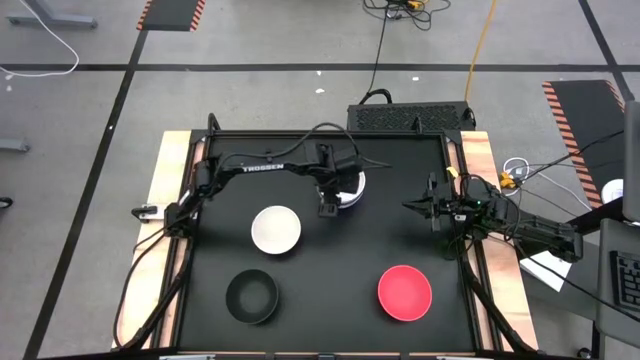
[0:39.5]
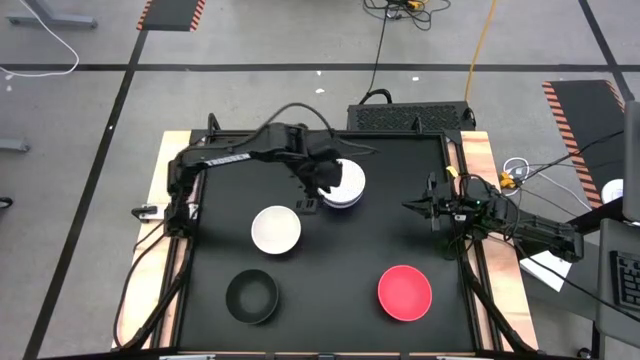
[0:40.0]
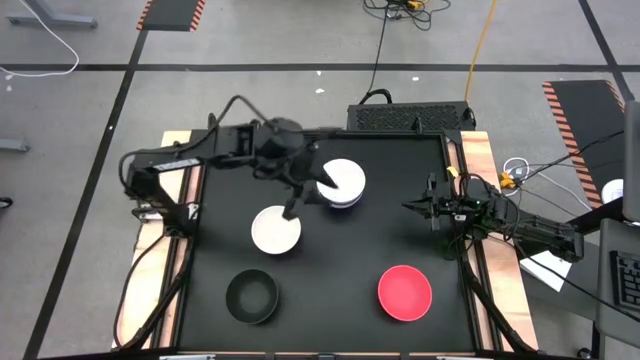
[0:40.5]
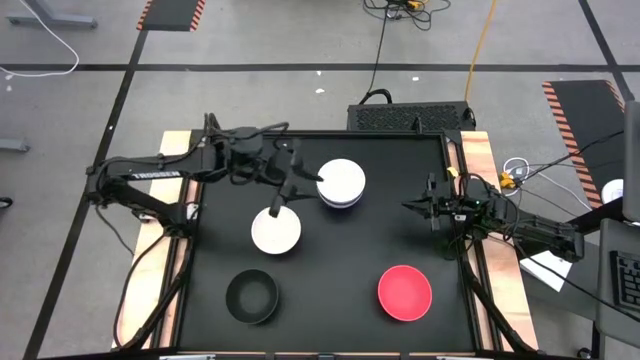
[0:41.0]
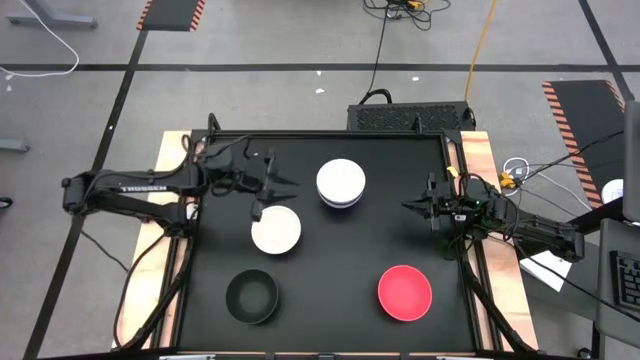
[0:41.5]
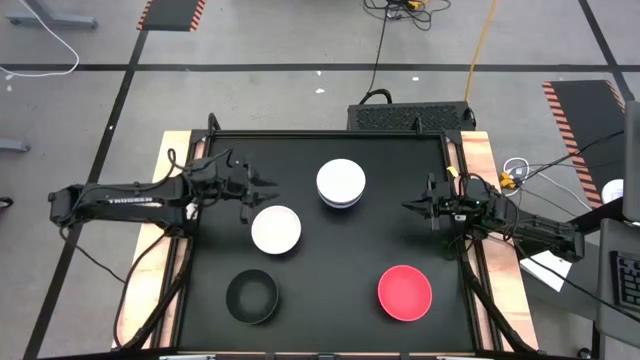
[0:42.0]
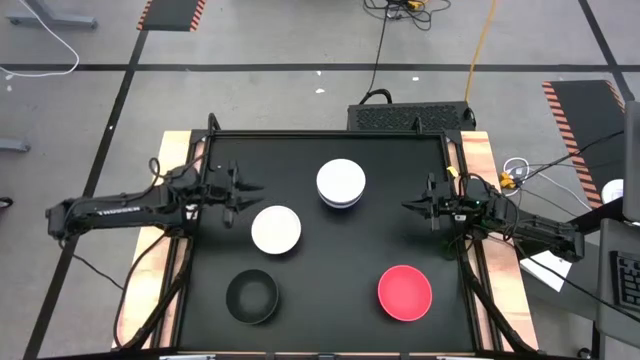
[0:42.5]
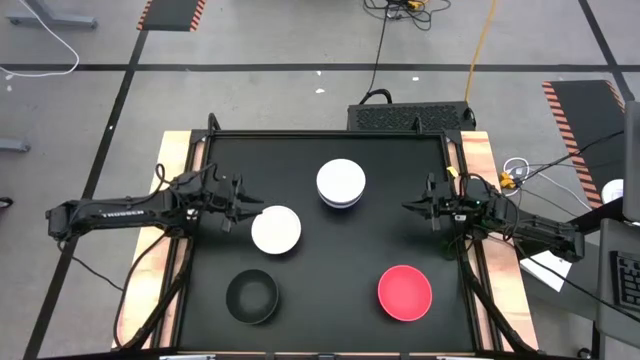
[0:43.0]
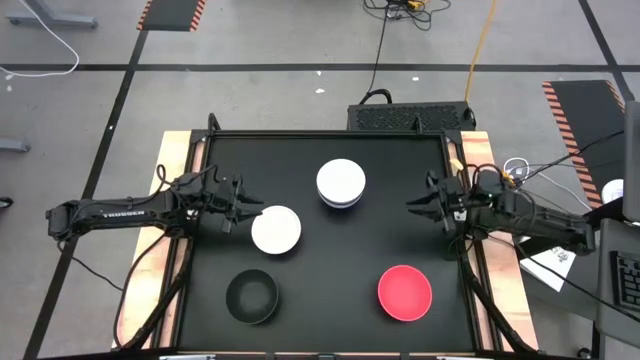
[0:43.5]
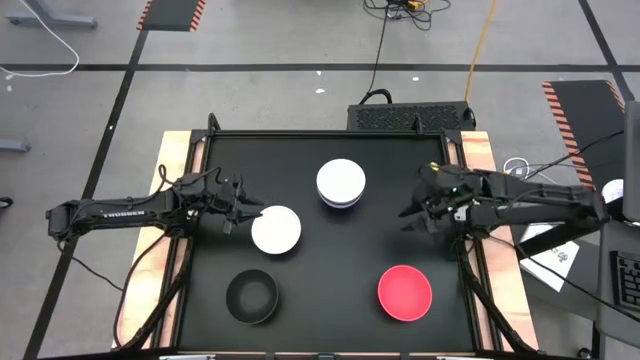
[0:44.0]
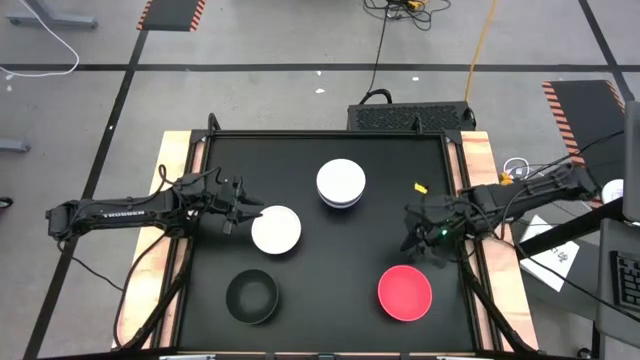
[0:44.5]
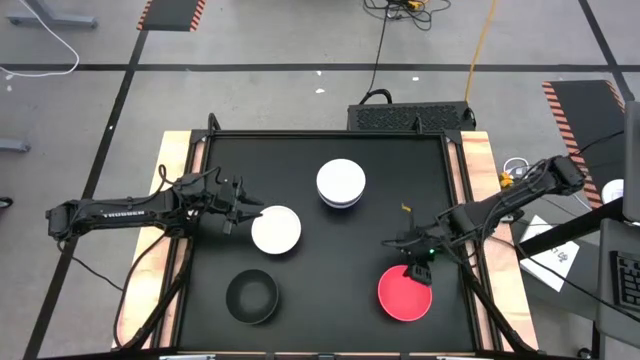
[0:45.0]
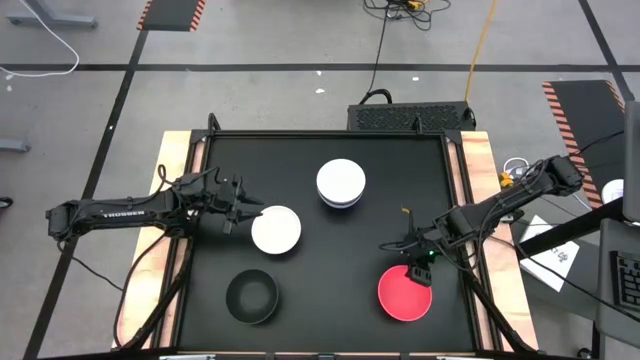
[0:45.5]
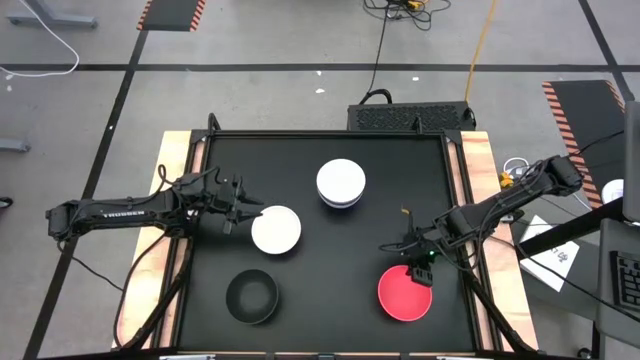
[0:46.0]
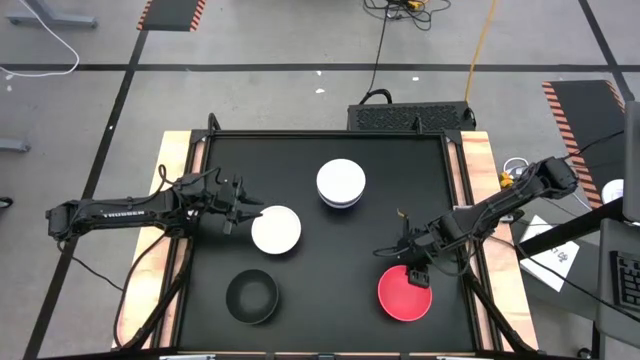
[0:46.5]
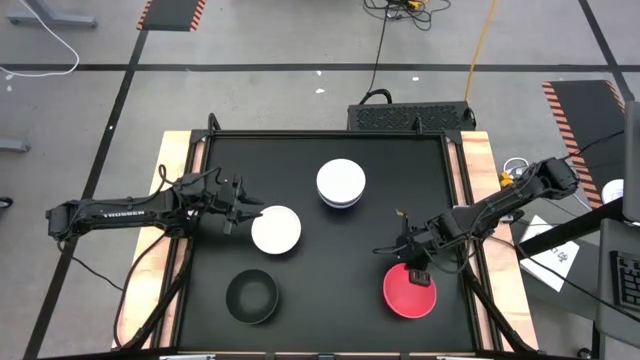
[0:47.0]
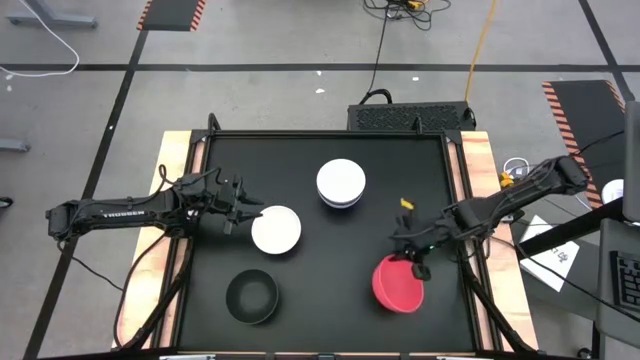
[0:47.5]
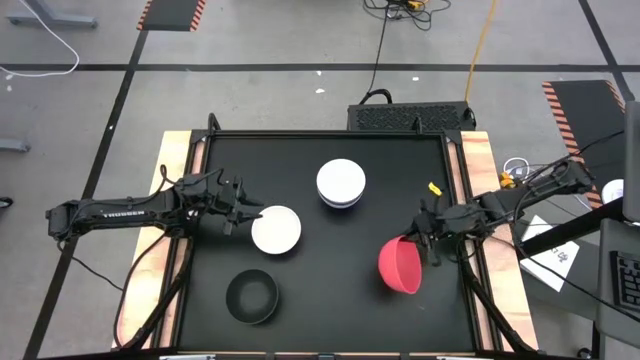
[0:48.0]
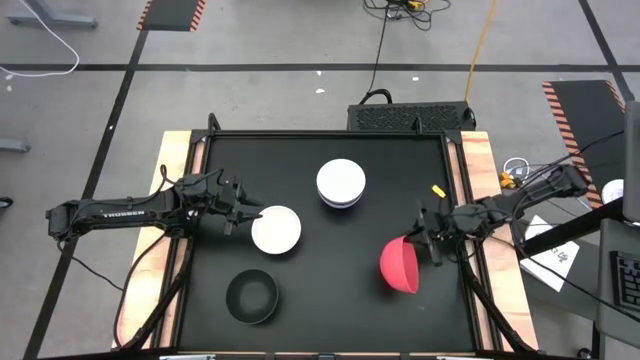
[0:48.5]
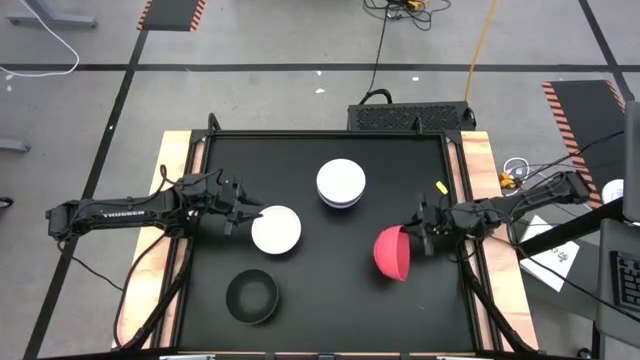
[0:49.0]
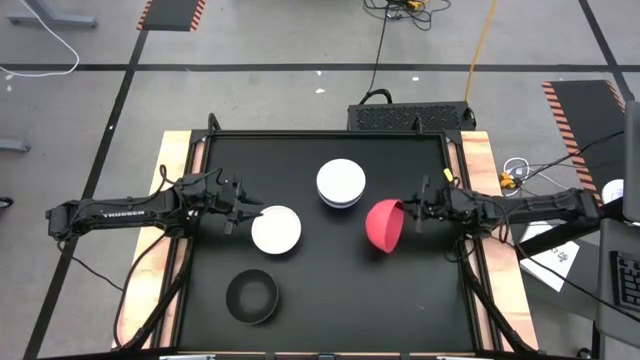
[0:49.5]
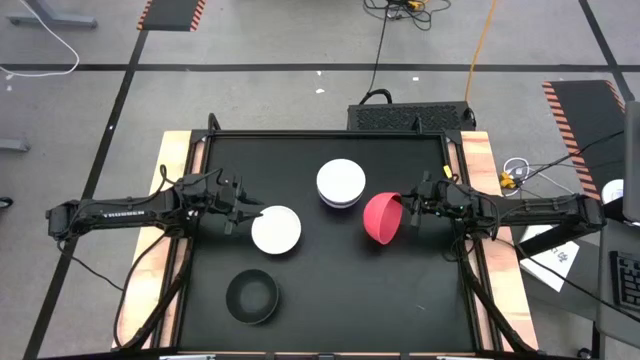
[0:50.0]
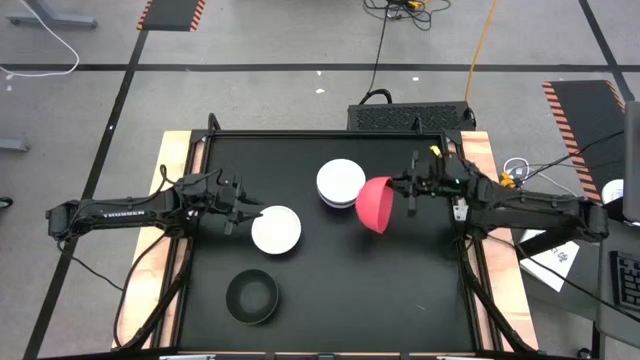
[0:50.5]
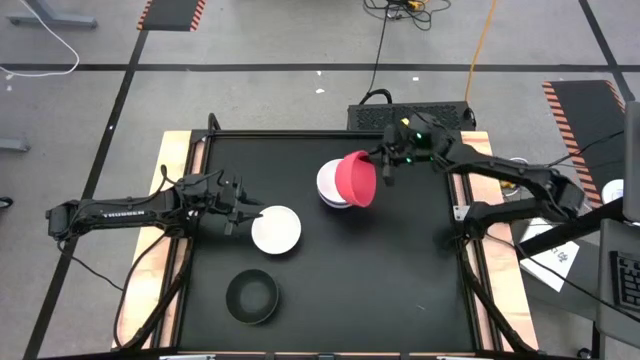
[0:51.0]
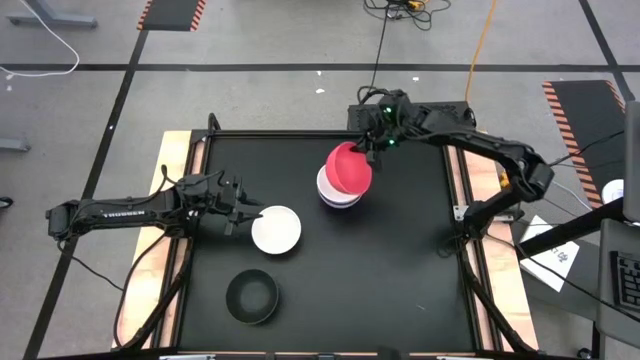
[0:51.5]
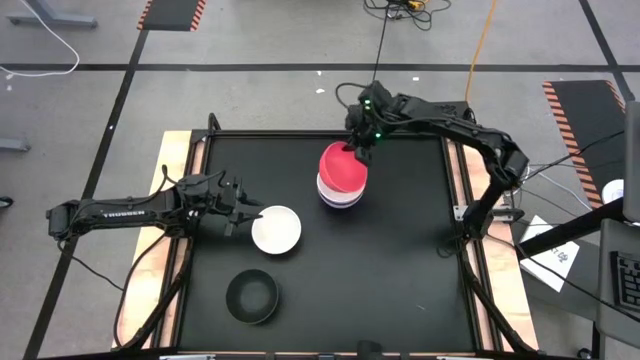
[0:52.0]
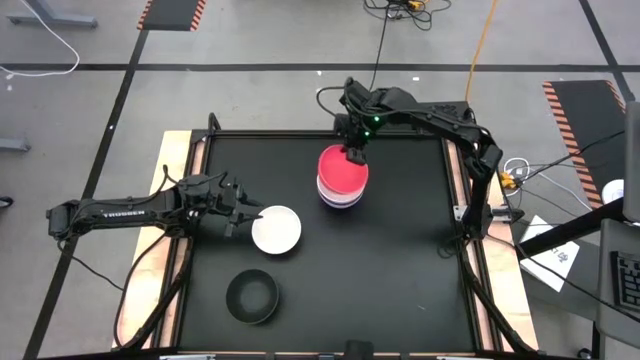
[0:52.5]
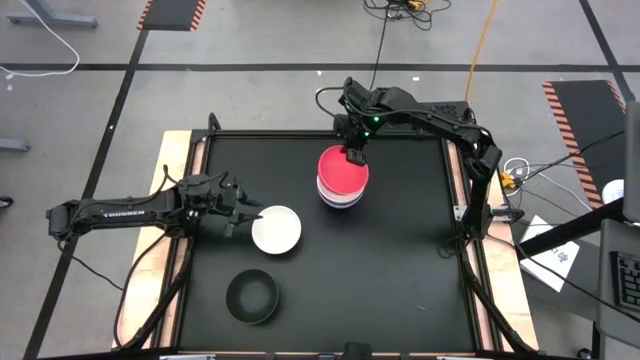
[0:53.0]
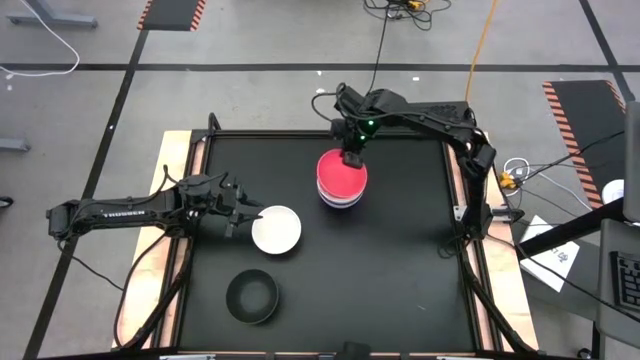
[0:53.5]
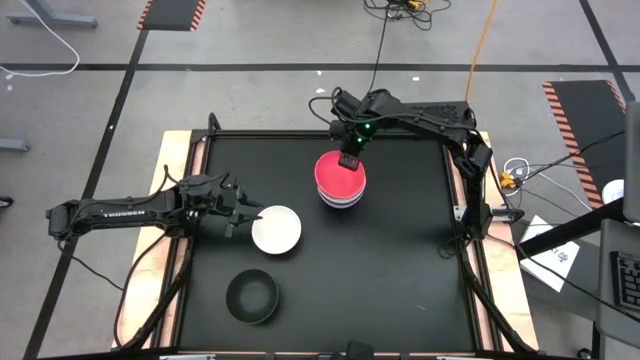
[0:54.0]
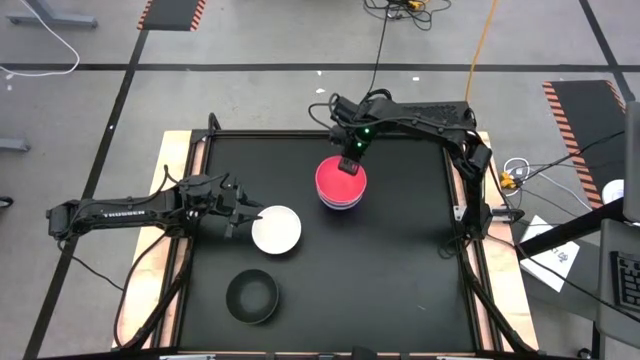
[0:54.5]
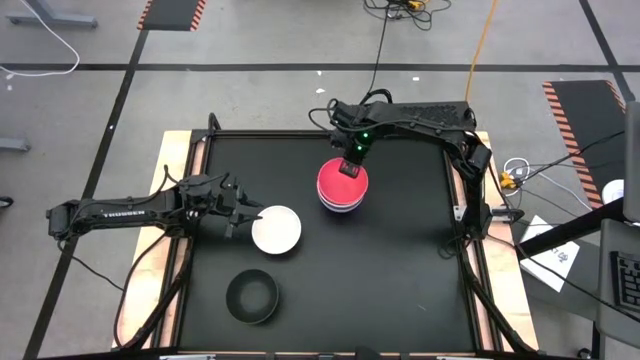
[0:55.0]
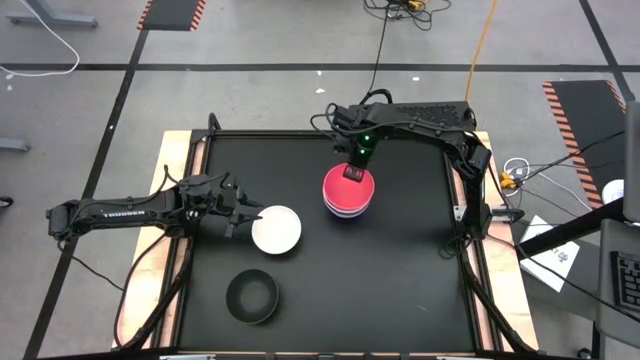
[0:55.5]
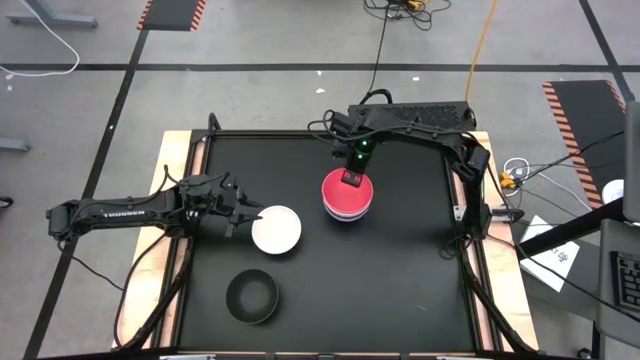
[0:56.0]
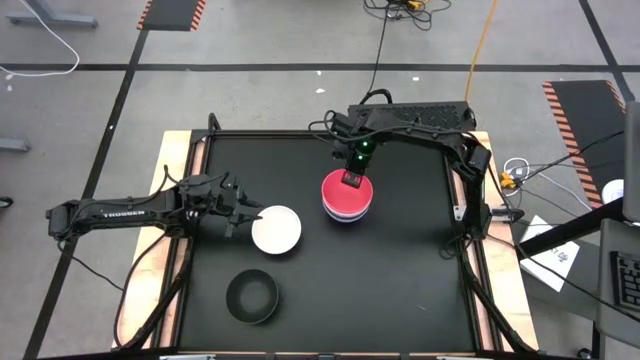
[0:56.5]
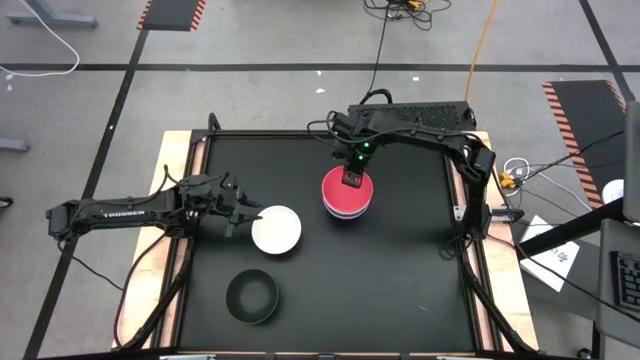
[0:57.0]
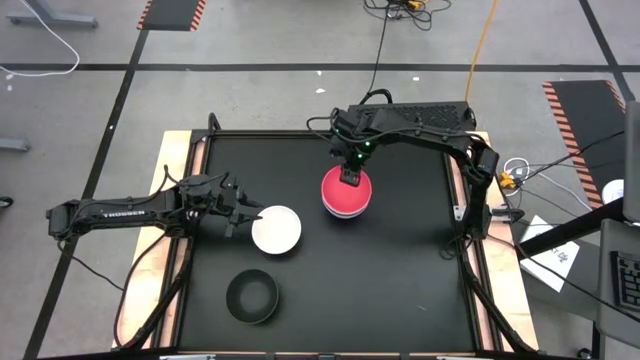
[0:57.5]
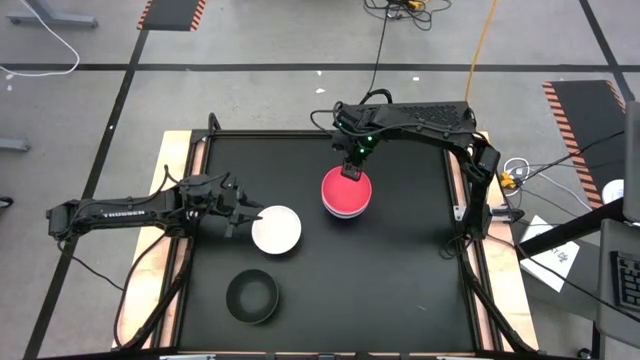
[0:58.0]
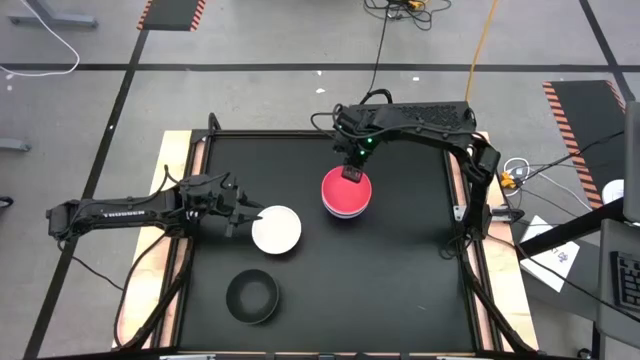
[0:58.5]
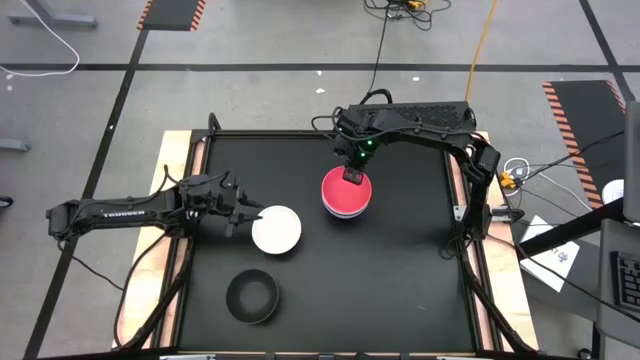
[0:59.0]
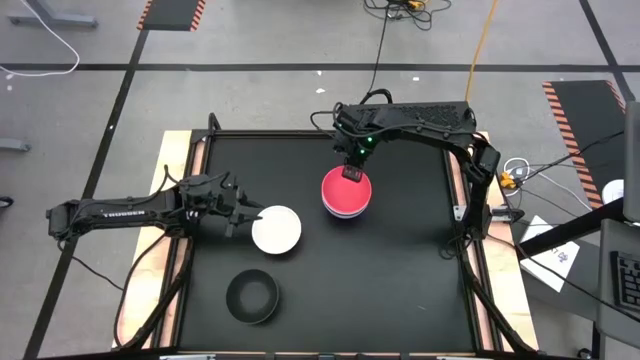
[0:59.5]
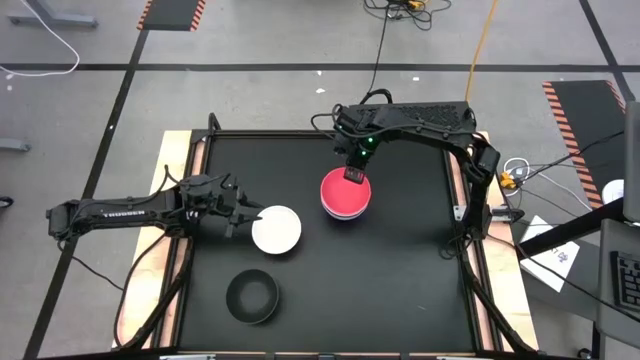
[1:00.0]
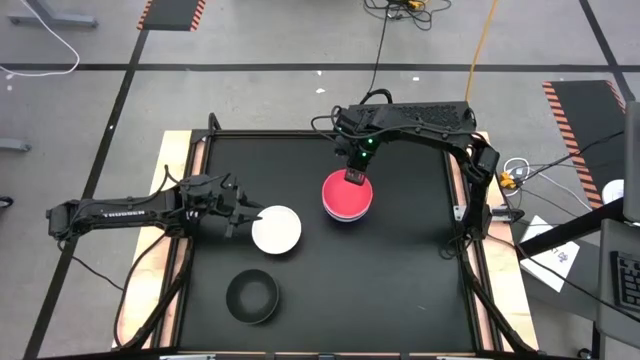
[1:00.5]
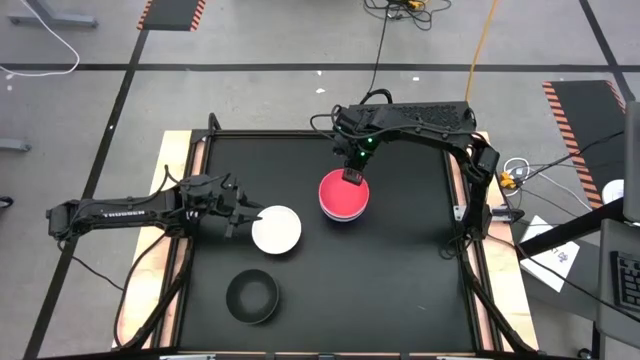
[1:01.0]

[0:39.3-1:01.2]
Task: Nest bowls inside each other
Stack the orange bowl on top of the white bowl
